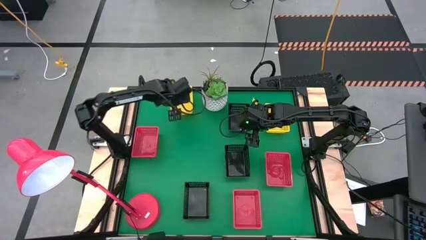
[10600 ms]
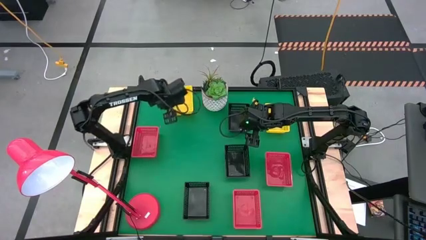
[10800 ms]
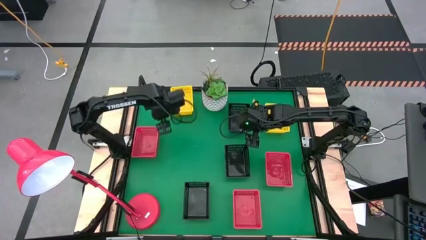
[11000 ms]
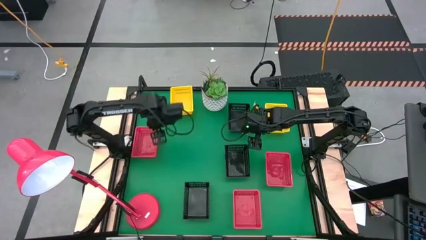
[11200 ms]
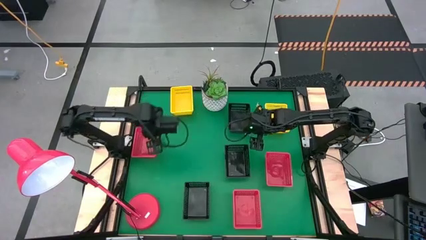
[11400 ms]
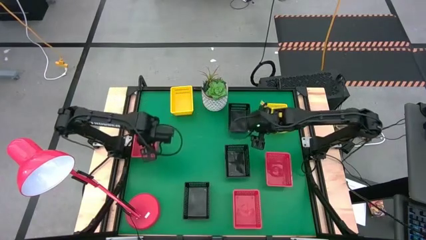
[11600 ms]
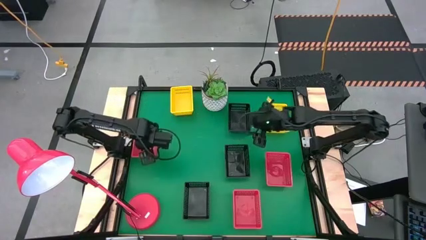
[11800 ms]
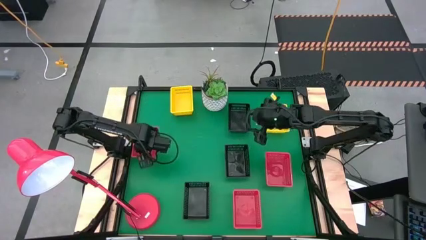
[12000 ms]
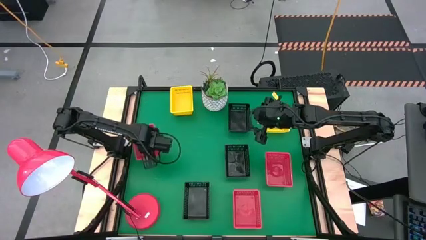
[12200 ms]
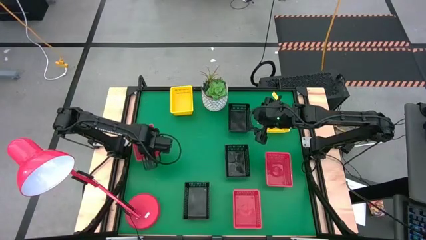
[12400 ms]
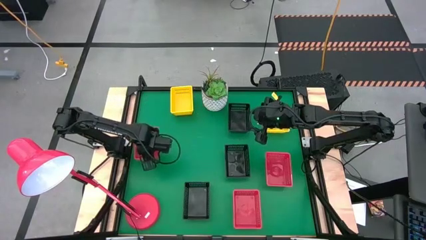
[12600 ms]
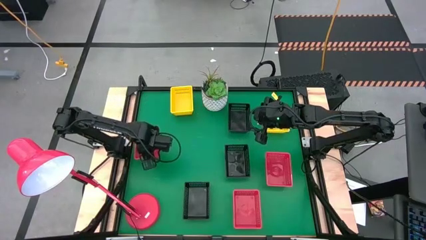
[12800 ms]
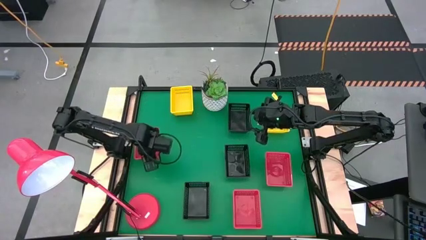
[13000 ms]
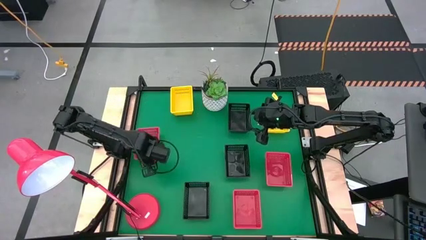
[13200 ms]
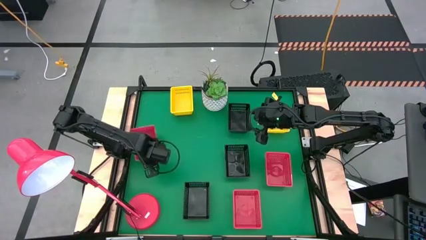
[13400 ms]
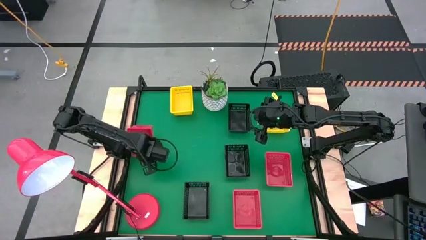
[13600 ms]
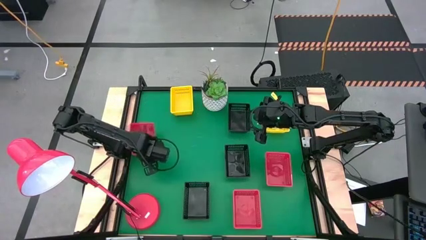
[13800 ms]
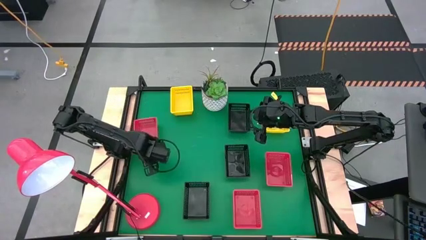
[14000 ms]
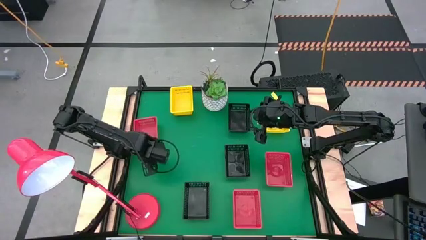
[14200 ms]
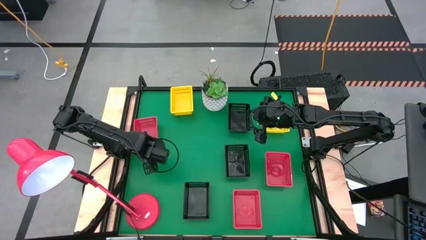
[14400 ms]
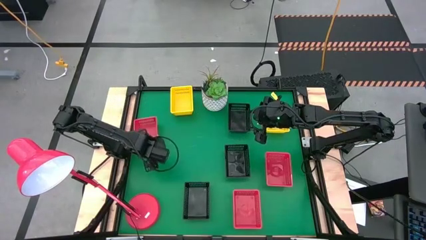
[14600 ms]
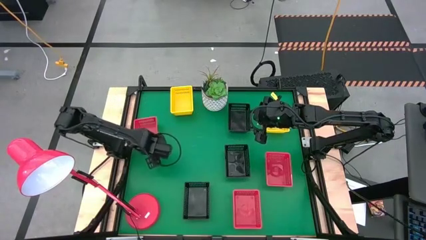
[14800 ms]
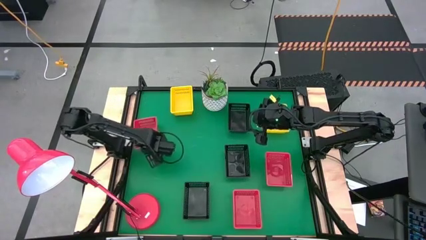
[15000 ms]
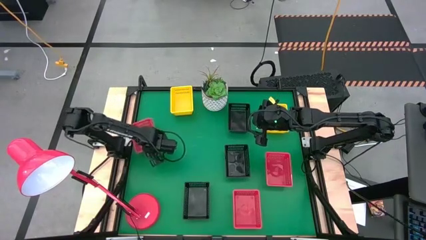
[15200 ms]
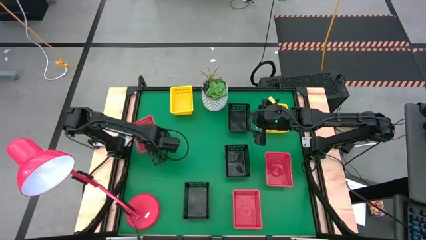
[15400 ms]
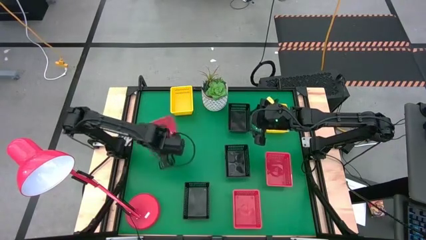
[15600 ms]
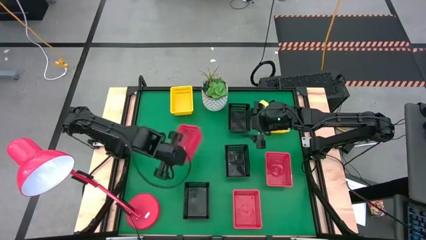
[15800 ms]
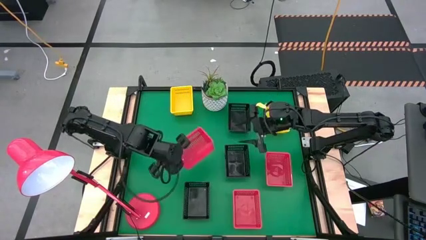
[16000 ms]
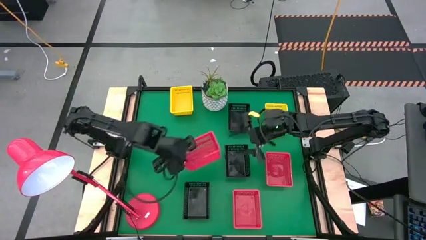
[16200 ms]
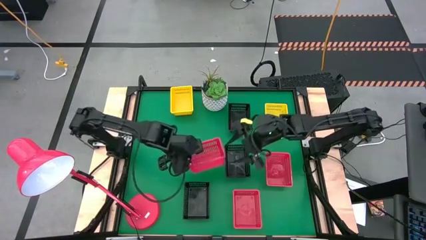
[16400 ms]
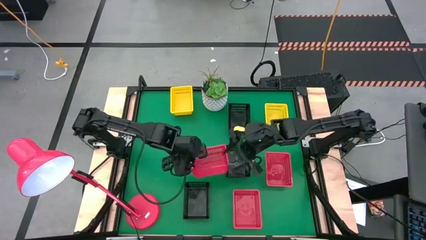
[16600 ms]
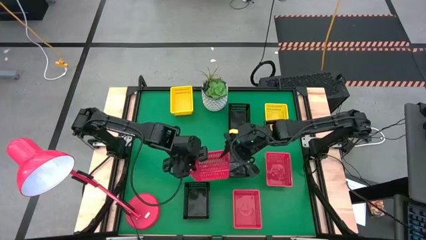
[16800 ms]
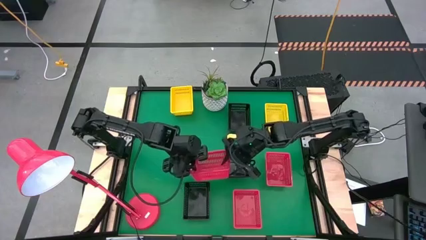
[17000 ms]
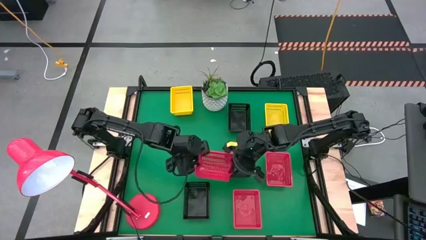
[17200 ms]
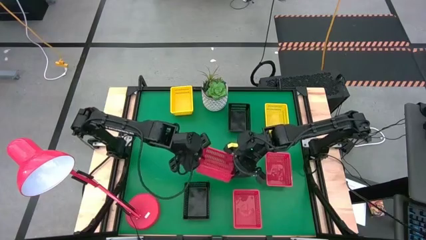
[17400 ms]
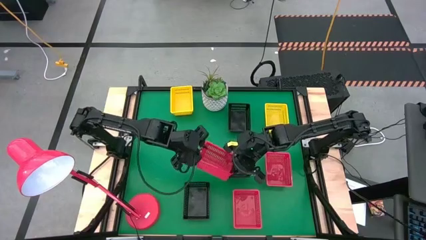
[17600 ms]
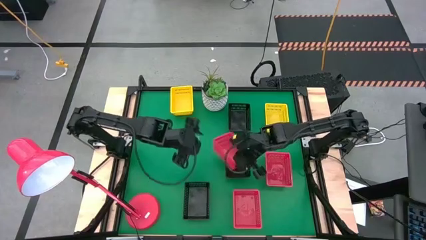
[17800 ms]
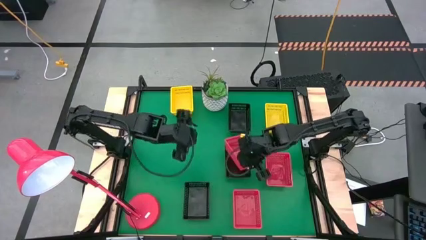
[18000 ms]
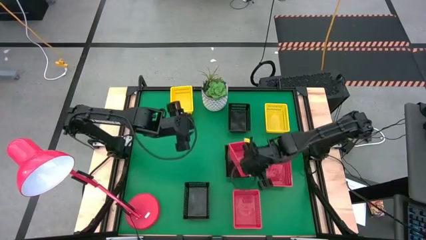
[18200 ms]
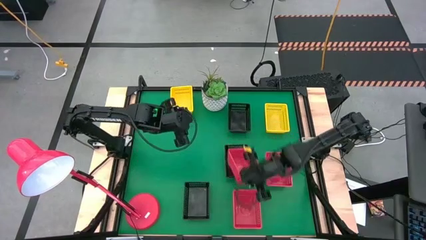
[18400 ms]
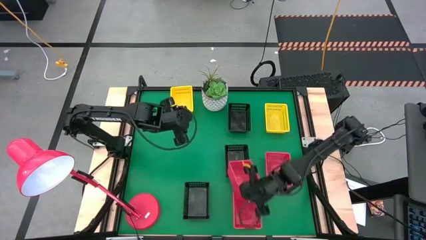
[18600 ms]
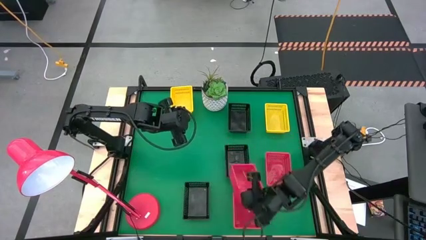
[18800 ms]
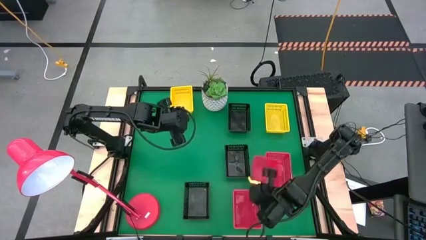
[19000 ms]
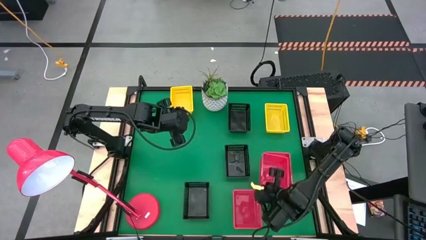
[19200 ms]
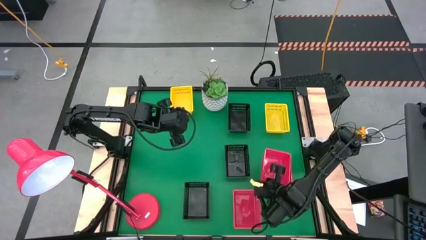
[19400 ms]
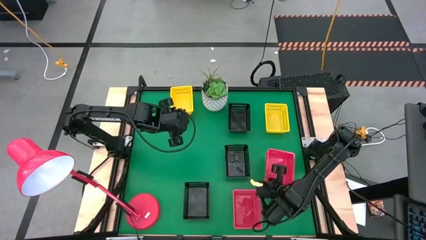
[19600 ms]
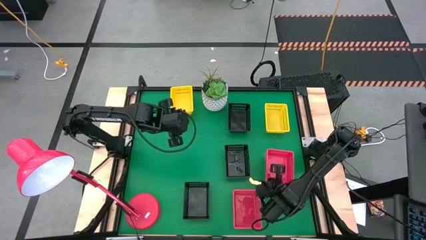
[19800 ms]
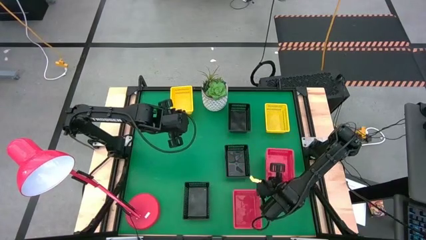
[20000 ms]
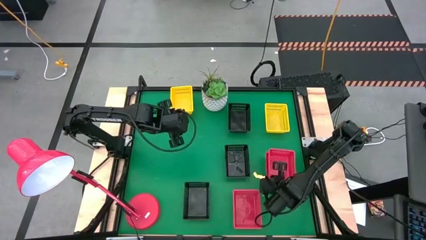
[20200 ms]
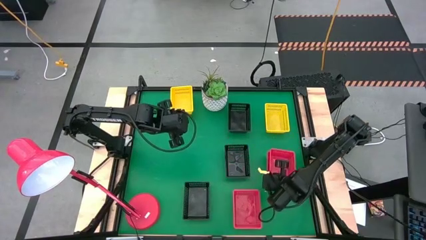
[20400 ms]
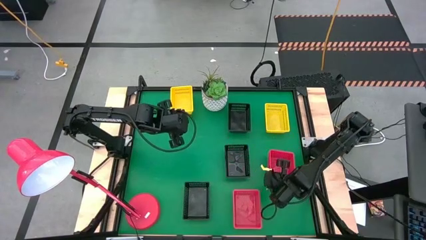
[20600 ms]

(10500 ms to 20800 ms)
Stack the top left red bin on the right red bin

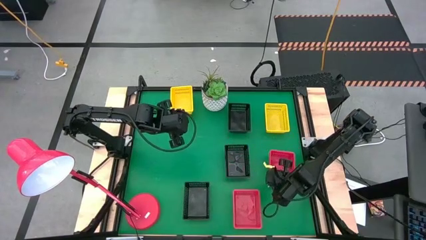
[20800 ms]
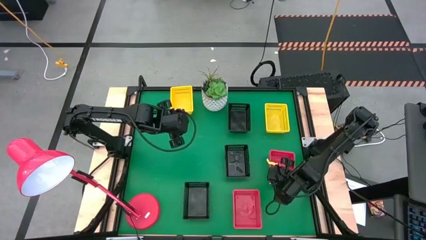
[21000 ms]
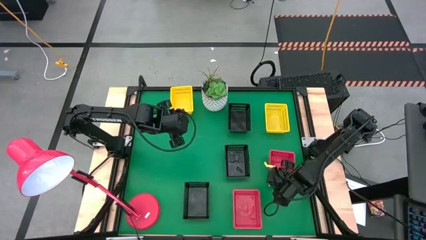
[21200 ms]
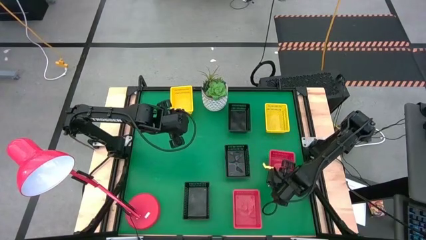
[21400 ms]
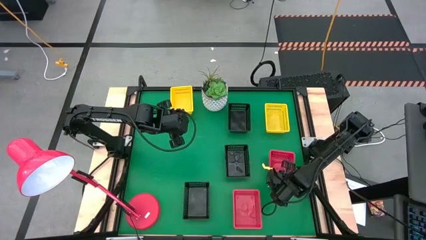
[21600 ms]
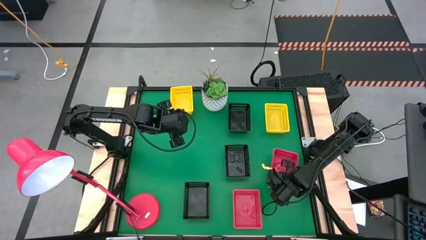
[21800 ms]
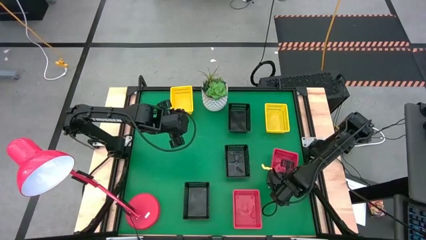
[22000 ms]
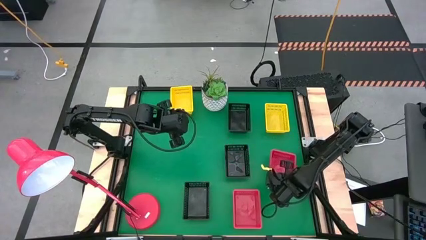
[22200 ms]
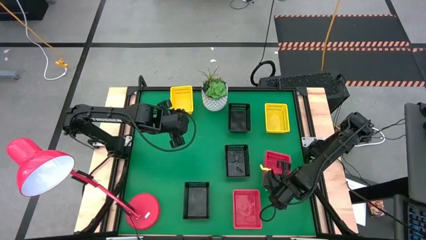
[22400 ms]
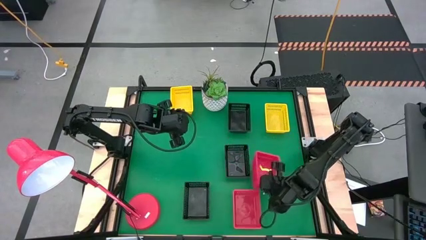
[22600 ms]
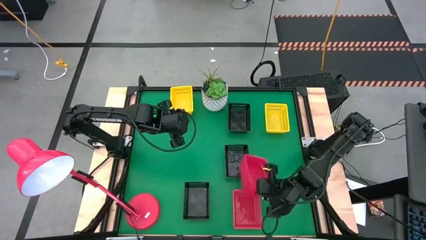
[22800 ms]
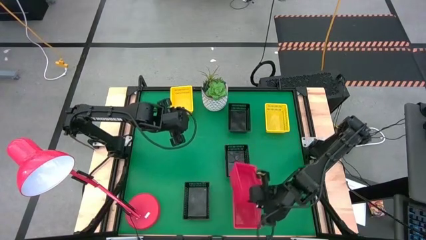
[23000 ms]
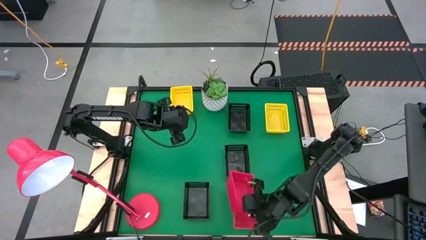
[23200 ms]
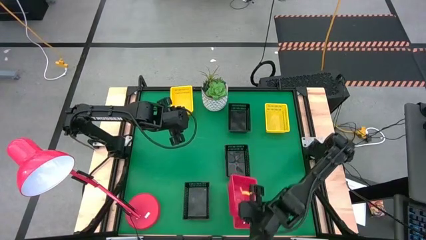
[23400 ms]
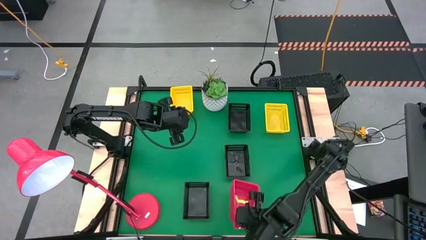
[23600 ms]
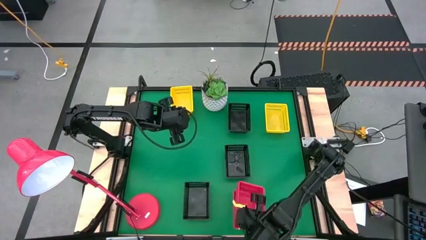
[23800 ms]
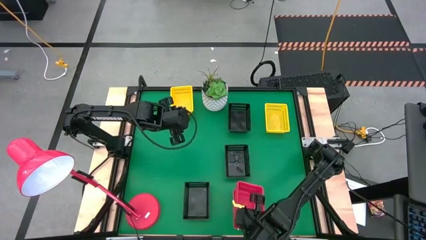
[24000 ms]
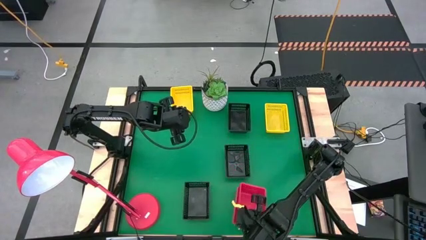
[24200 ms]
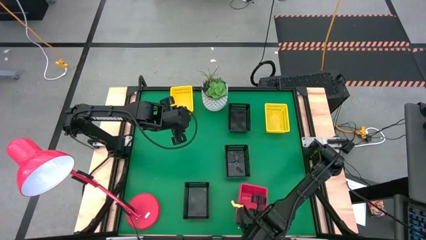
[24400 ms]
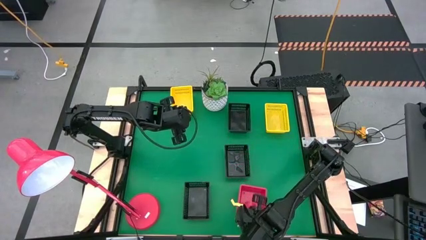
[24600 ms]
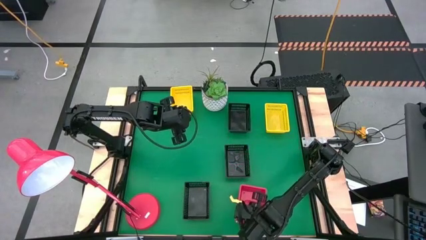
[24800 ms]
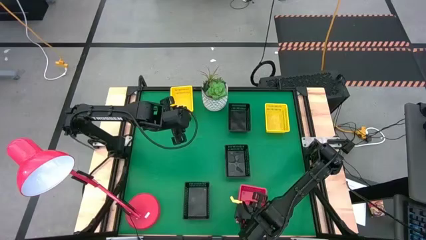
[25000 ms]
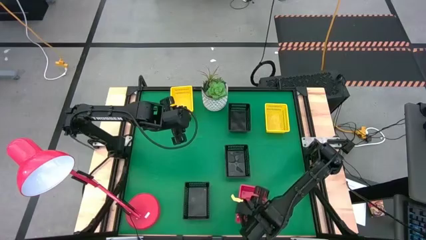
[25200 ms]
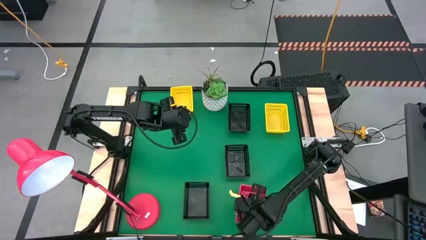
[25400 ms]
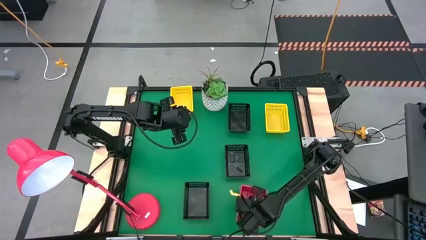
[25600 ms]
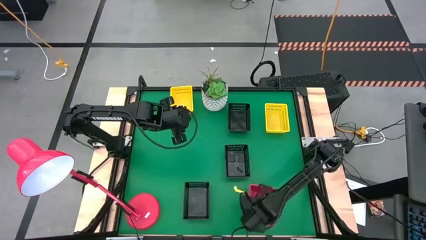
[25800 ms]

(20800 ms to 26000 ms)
Stack the stacked top orange bins on the bottom orange bin
